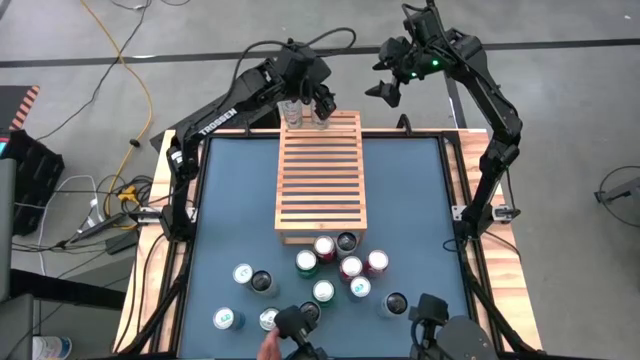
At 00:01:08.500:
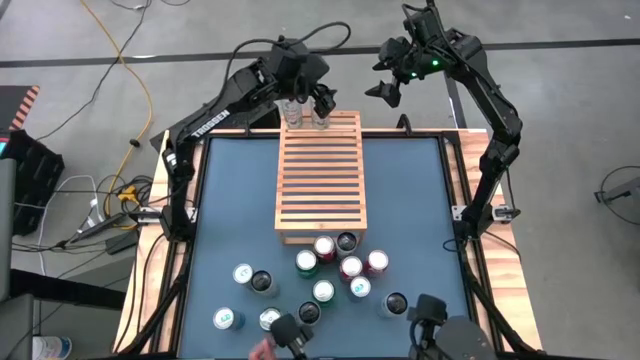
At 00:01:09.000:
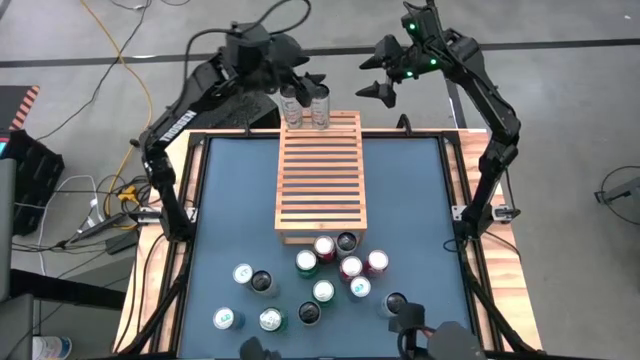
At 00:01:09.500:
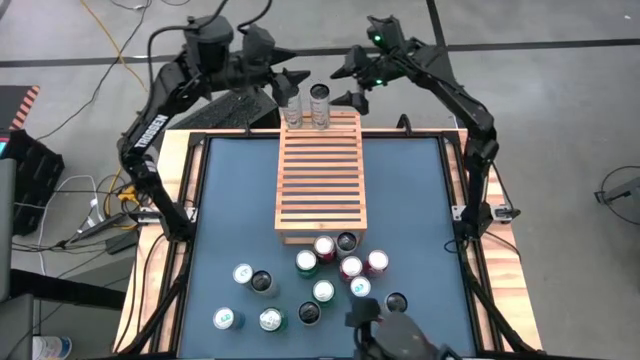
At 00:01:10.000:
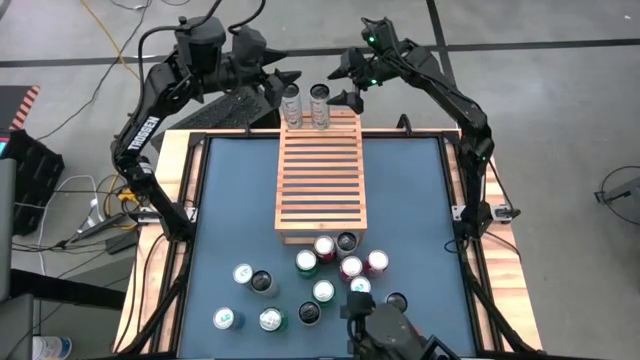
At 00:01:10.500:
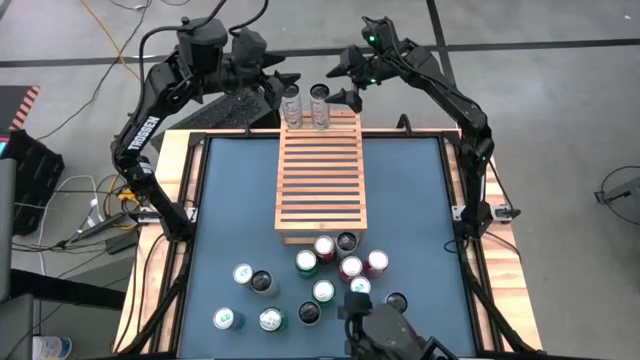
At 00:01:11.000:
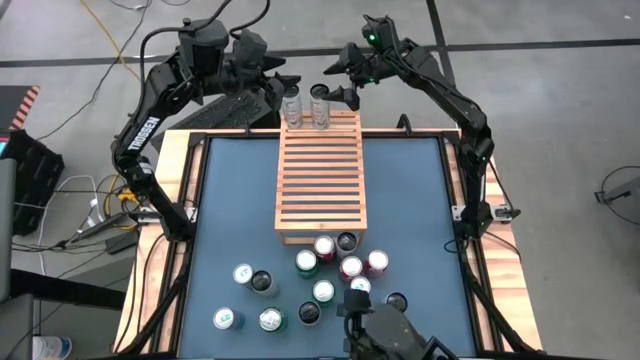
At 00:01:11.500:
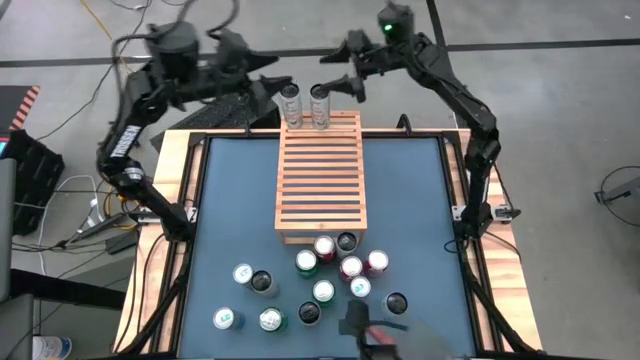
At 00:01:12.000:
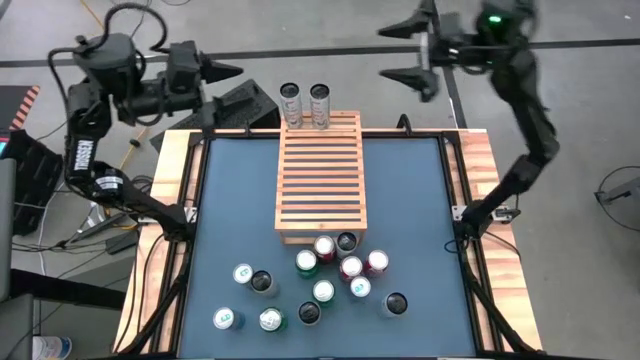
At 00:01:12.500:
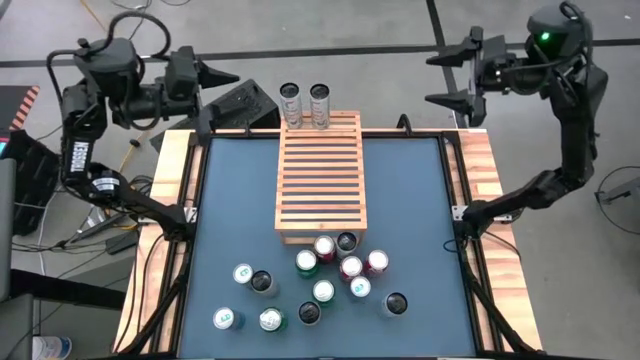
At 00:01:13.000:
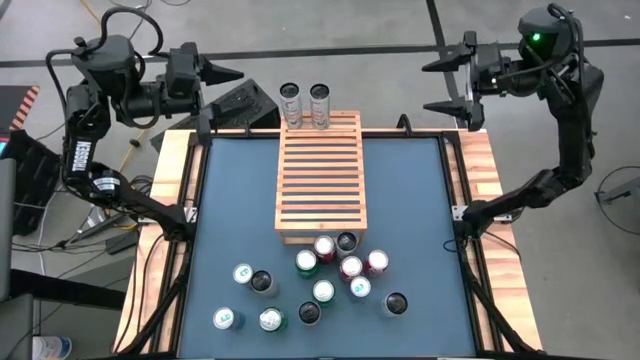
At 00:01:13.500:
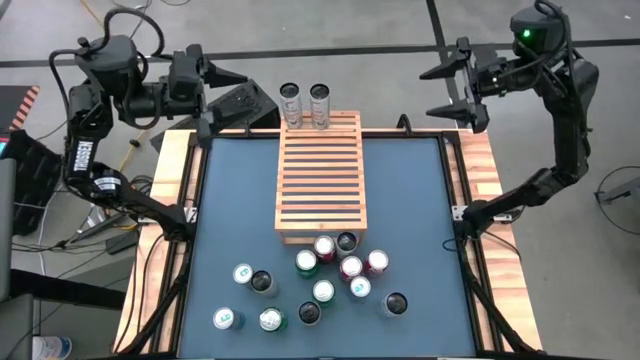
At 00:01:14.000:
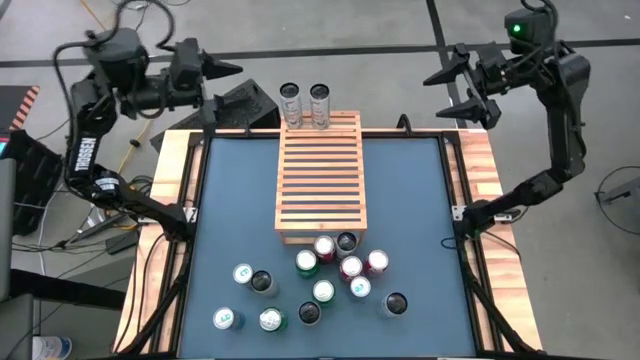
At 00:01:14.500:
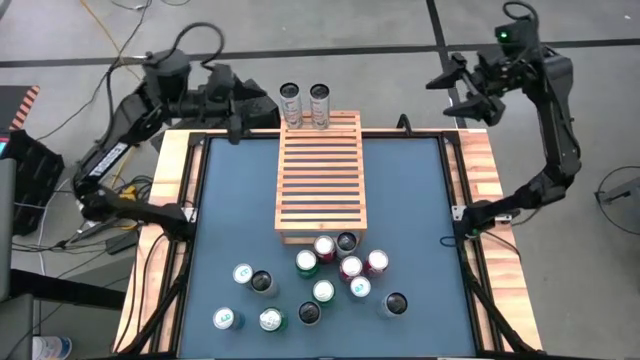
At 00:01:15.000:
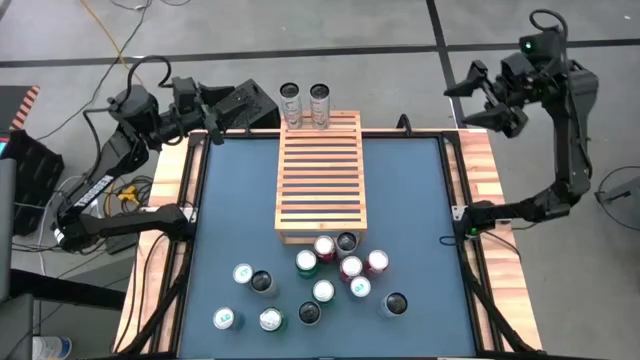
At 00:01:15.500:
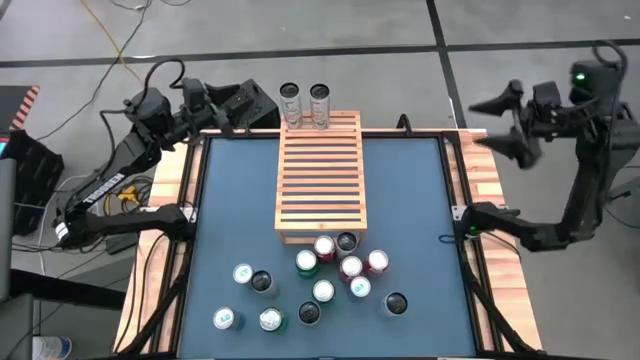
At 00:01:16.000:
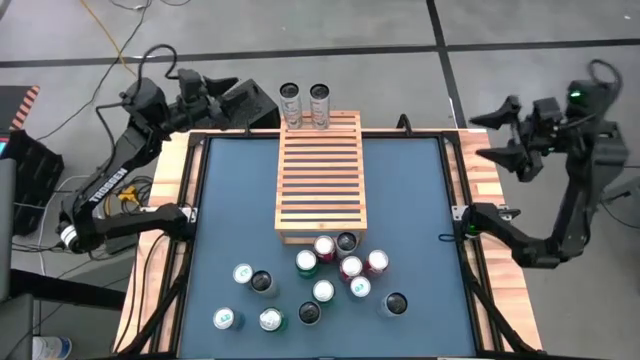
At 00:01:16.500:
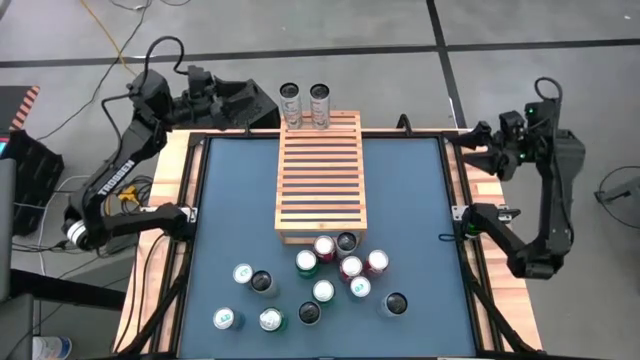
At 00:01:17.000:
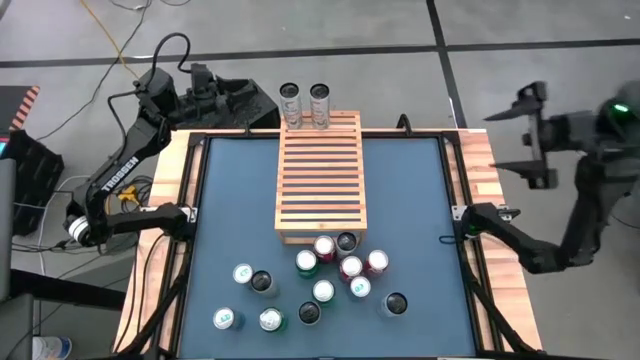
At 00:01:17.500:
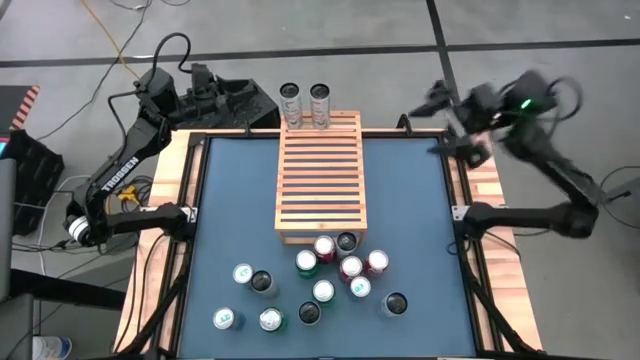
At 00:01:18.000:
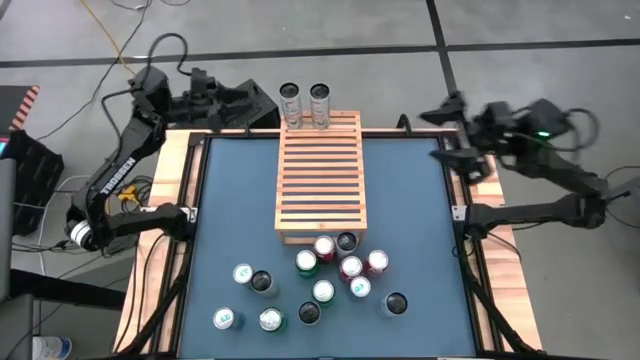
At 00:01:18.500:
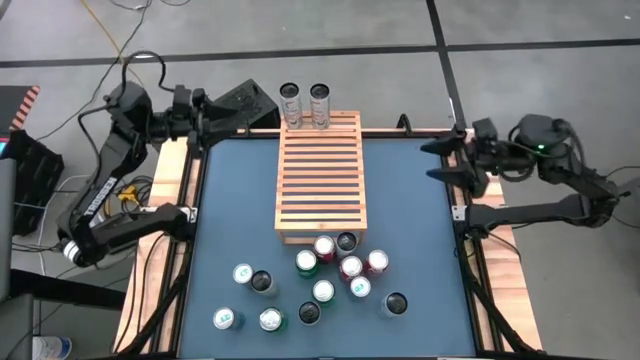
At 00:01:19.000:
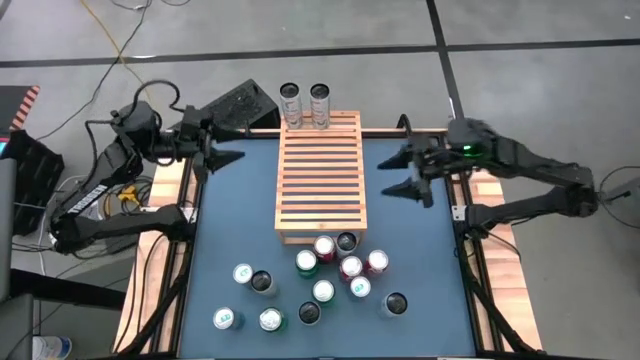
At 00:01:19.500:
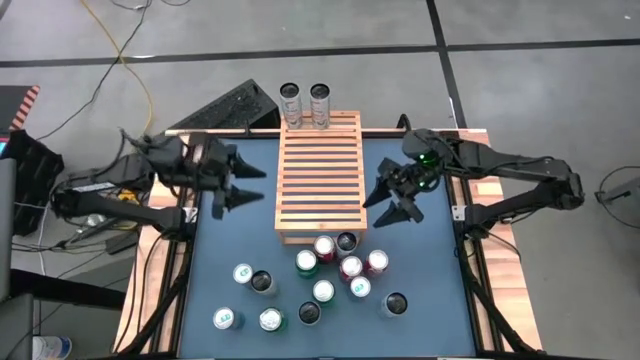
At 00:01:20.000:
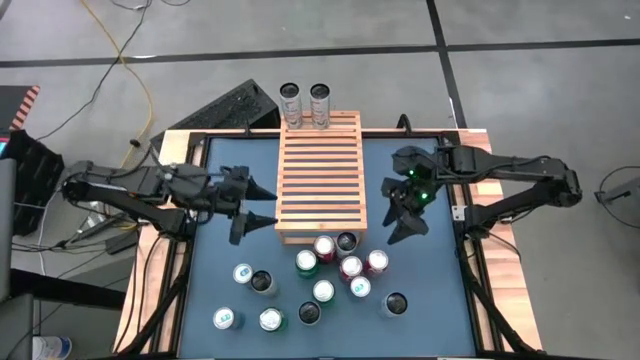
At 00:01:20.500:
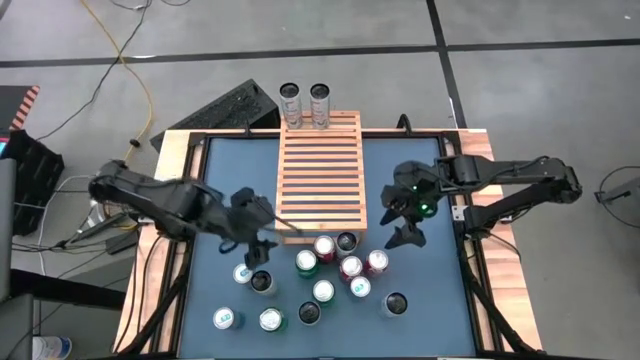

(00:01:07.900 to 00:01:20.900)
Task: Place canned beverage on shelf
Put the white yellow soda can on the shelf aligned with the other white yellow soda cans

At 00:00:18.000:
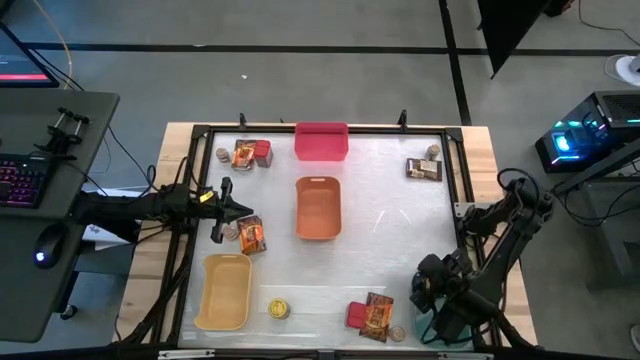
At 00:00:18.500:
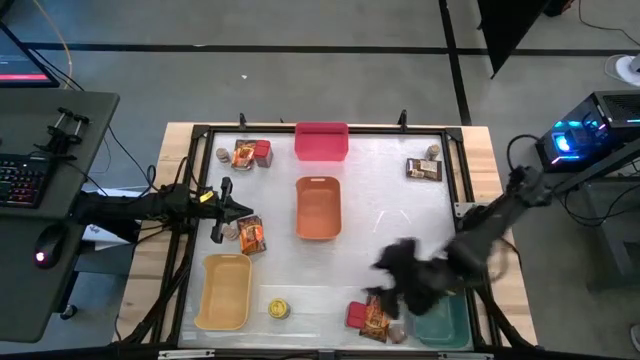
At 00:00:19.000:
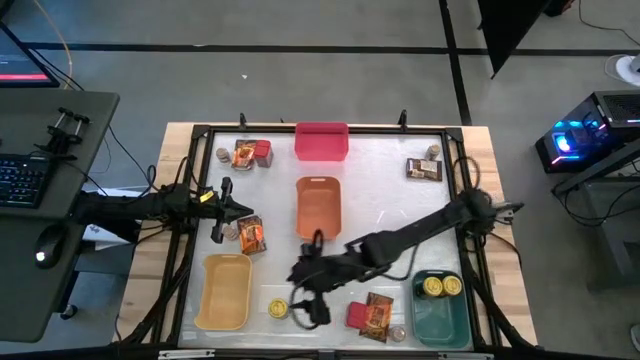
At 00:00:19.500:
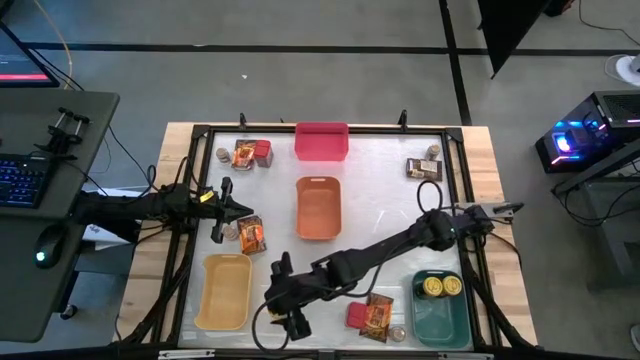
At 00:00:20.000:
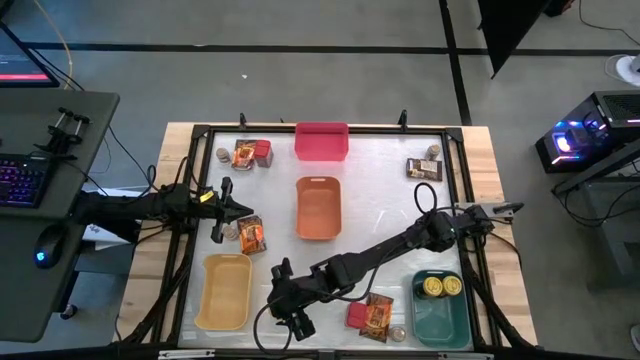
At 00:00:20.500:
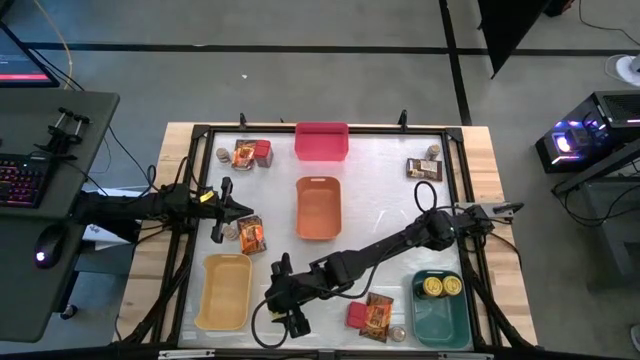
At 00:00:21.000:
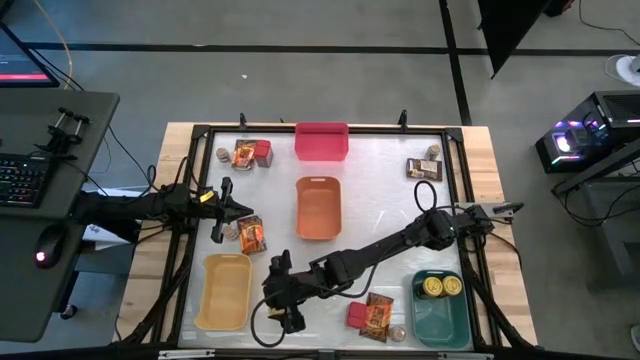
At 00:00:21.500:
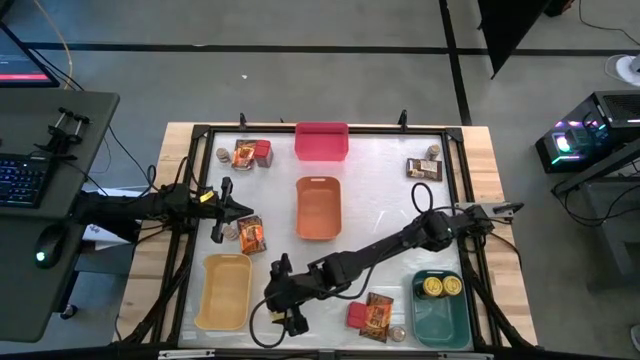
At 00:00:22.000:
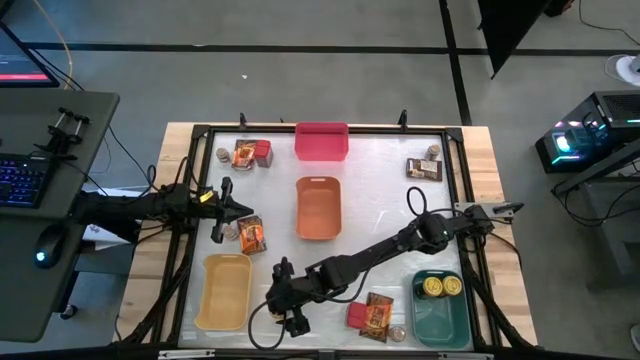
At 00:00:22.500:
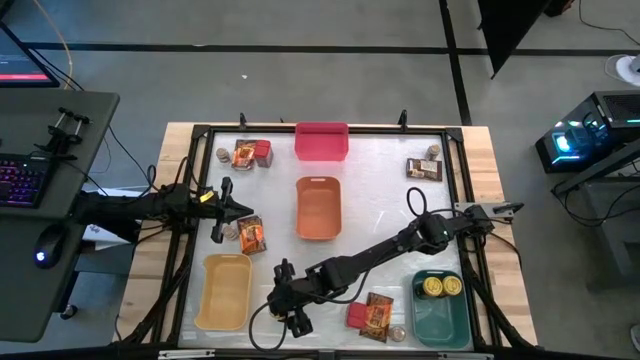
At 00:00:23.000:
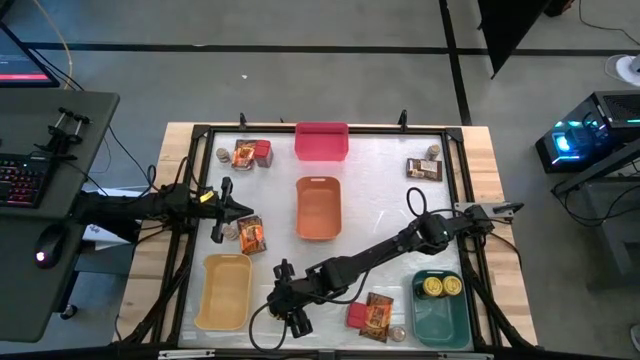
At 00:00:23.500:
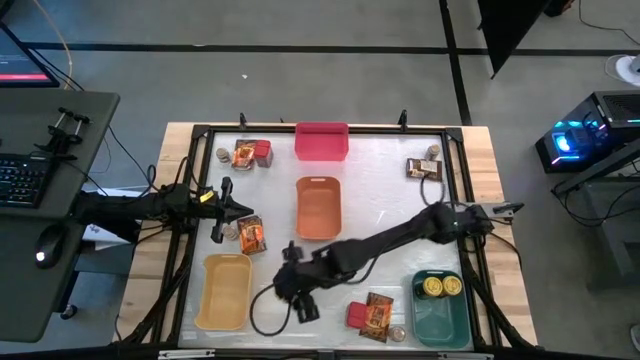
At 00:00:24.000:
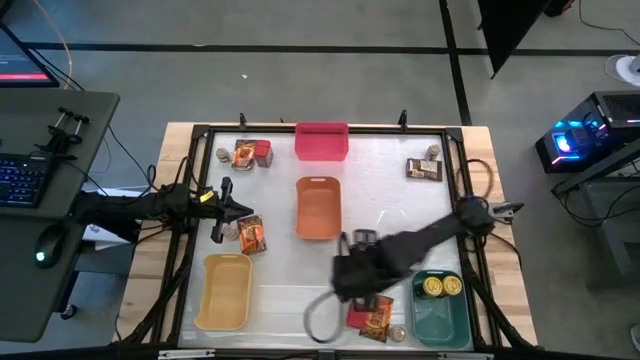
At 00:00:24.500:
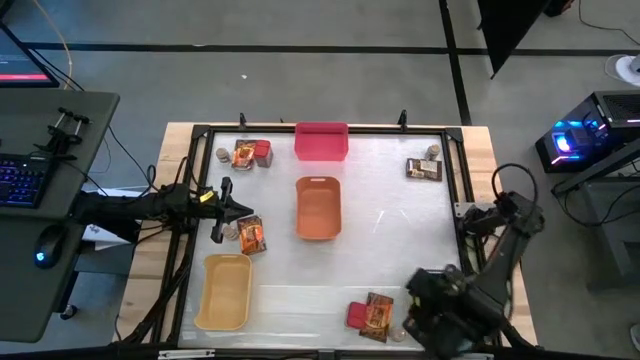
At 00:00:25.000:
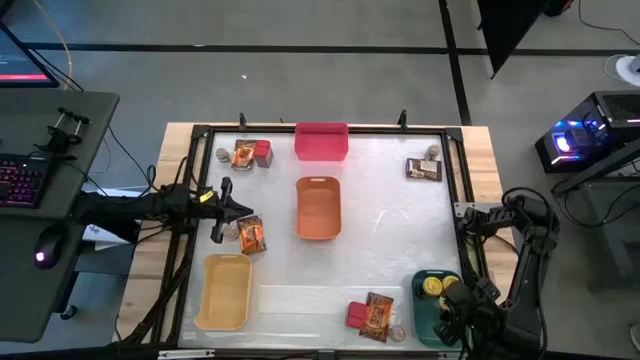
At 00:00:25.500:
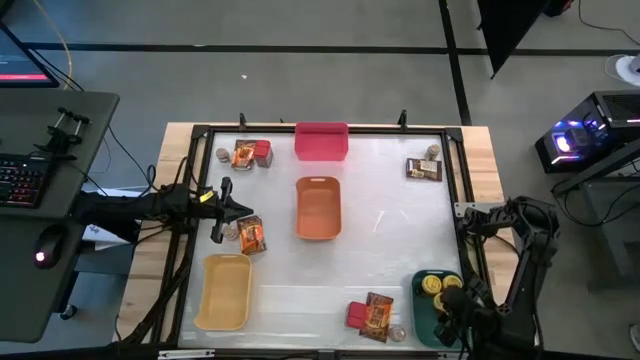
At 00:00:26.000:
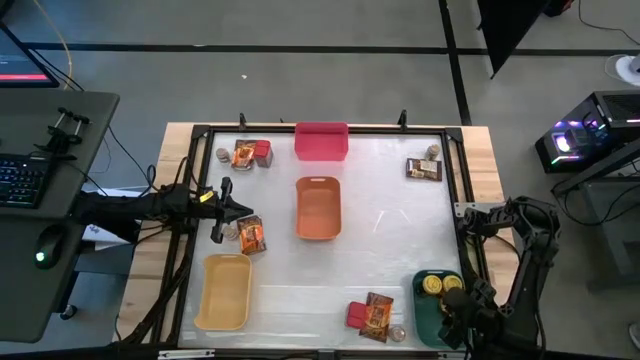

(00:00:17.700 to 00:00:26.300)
Task: Sort spices by type
Put the yellow spice bottle into the green bin
